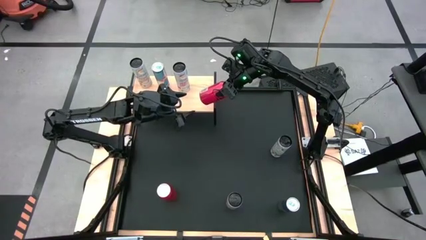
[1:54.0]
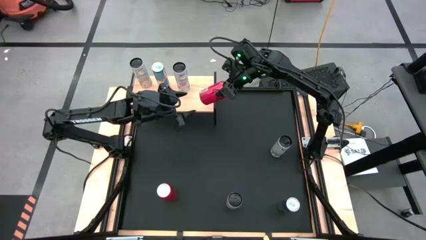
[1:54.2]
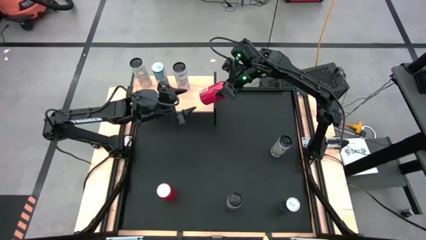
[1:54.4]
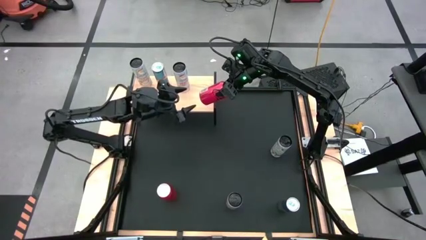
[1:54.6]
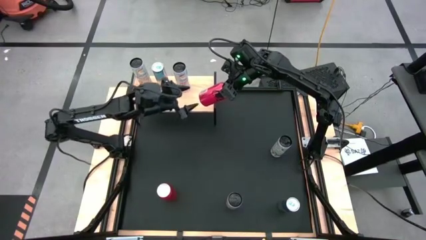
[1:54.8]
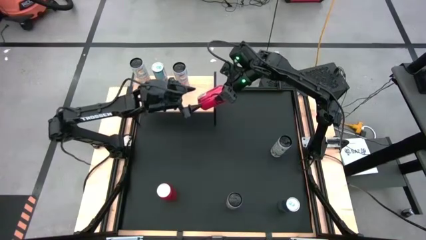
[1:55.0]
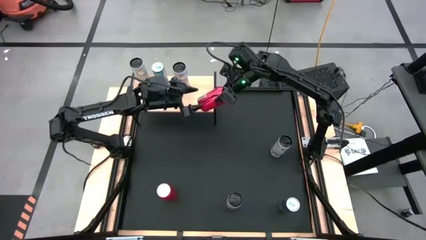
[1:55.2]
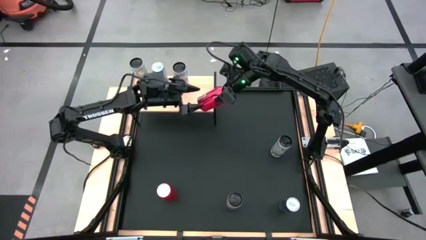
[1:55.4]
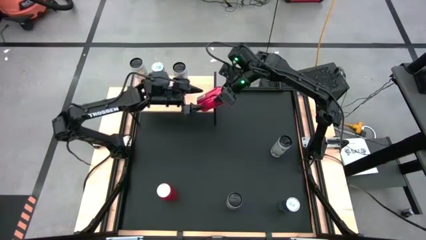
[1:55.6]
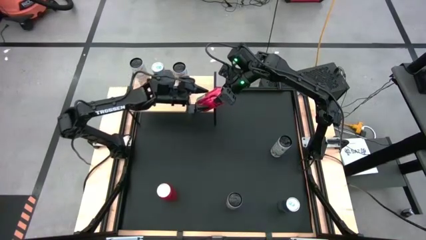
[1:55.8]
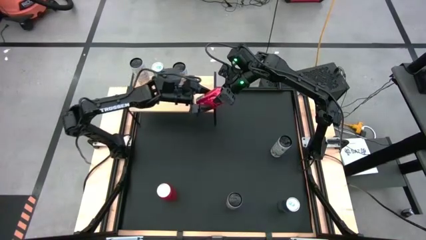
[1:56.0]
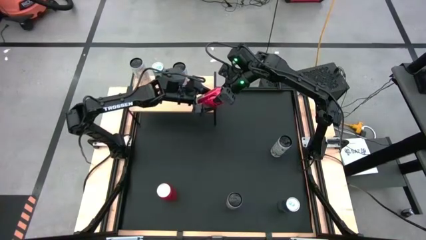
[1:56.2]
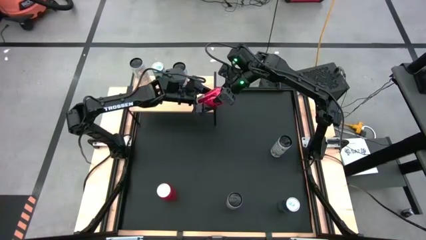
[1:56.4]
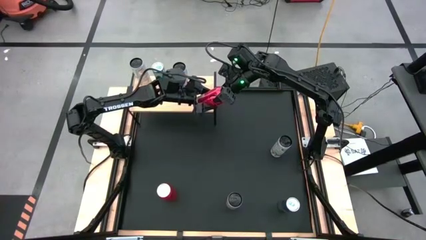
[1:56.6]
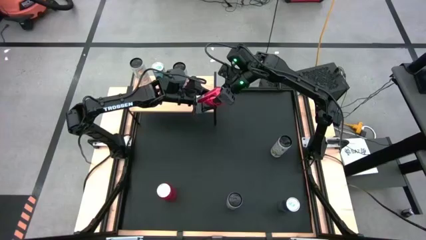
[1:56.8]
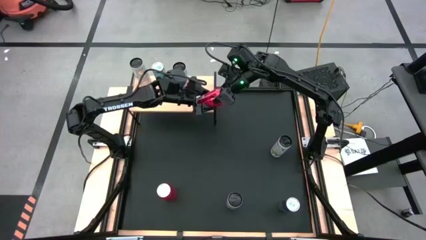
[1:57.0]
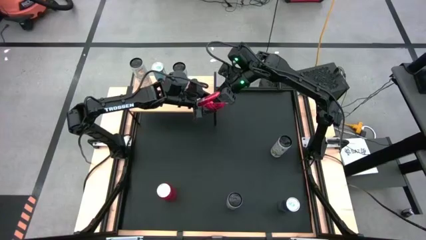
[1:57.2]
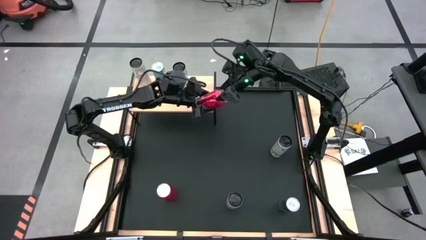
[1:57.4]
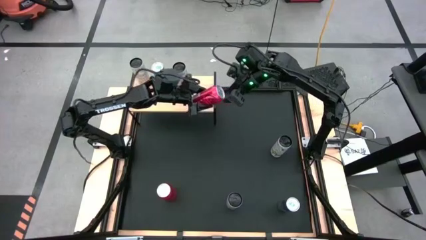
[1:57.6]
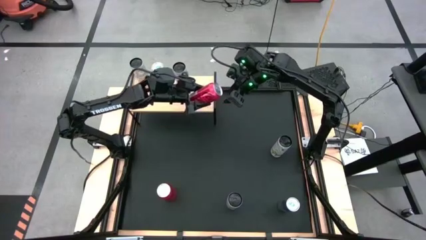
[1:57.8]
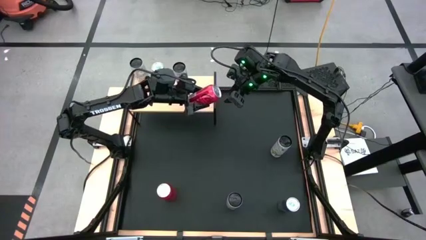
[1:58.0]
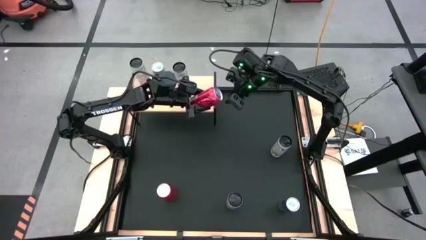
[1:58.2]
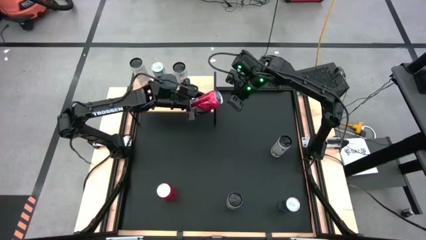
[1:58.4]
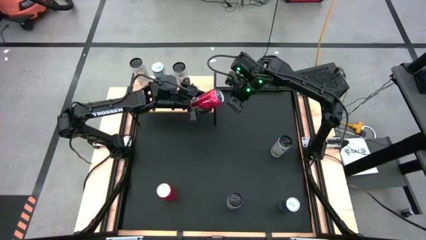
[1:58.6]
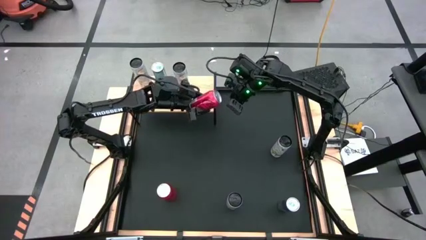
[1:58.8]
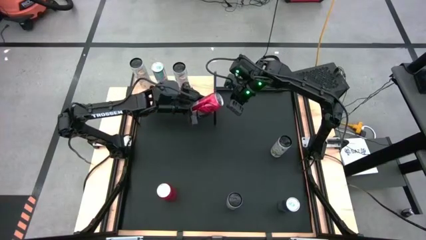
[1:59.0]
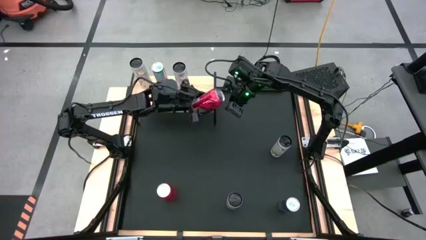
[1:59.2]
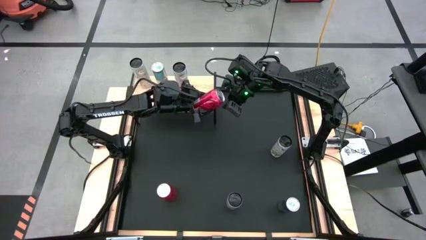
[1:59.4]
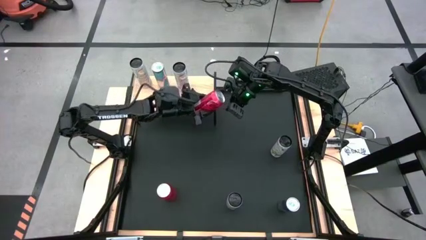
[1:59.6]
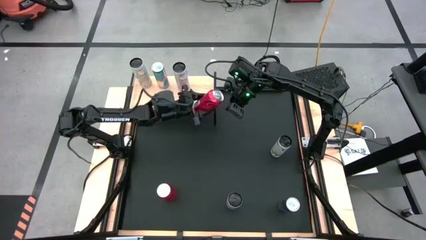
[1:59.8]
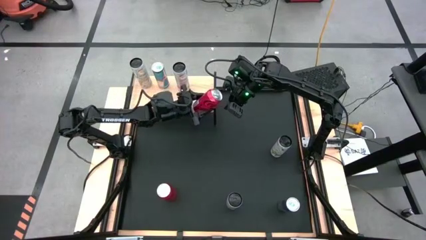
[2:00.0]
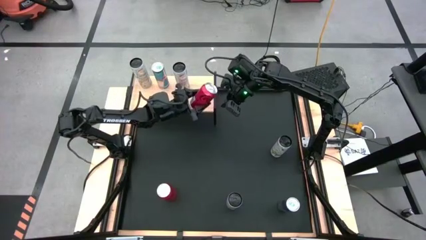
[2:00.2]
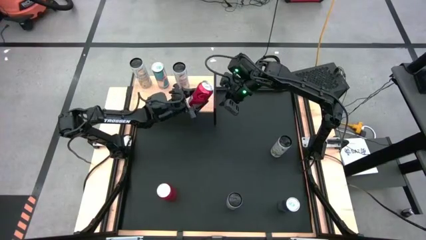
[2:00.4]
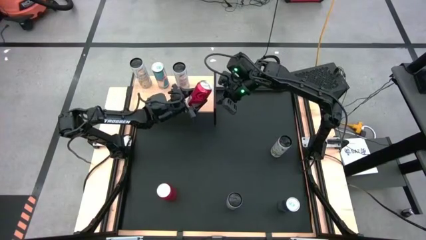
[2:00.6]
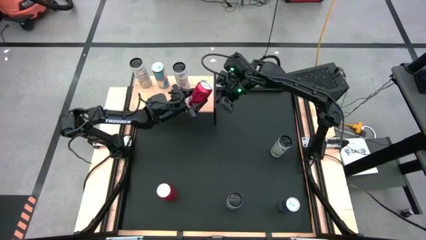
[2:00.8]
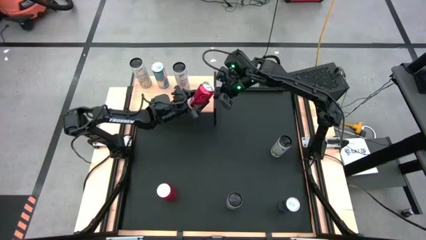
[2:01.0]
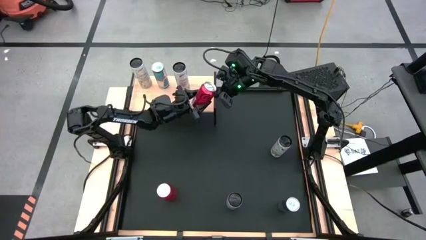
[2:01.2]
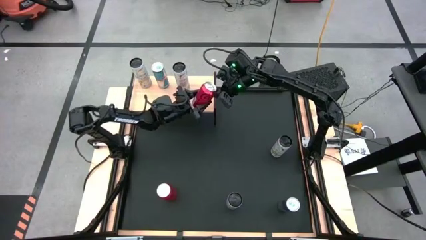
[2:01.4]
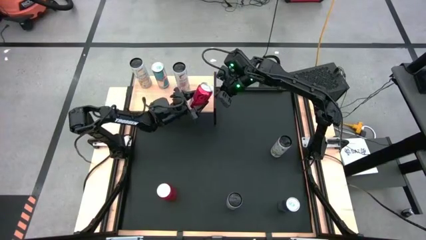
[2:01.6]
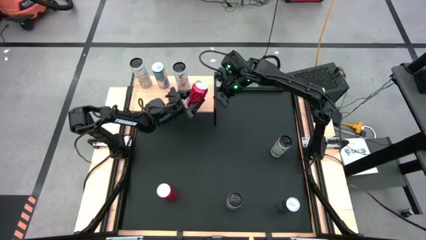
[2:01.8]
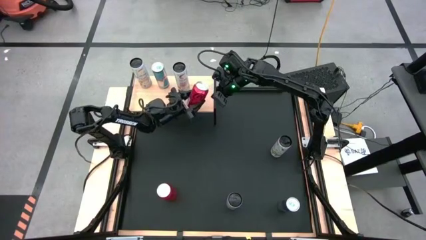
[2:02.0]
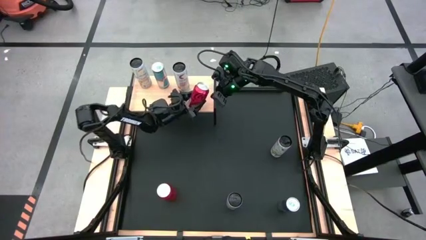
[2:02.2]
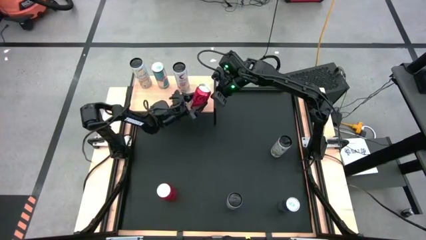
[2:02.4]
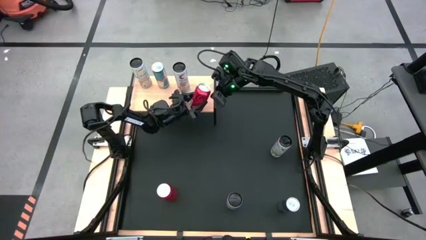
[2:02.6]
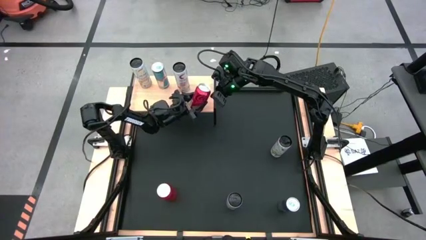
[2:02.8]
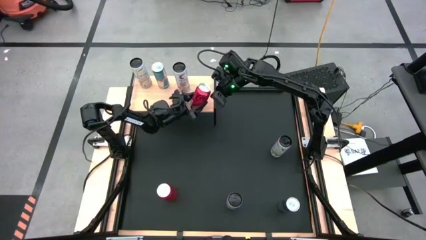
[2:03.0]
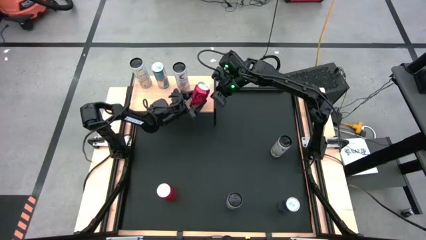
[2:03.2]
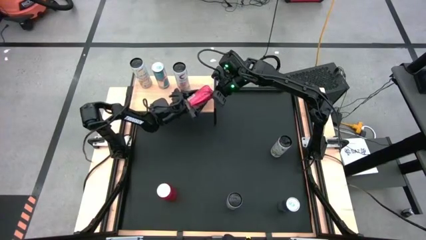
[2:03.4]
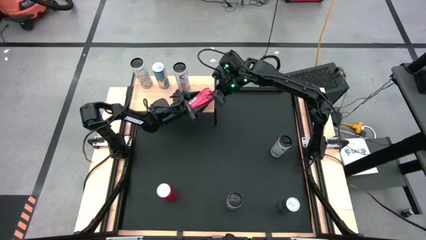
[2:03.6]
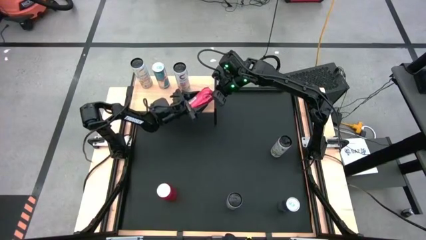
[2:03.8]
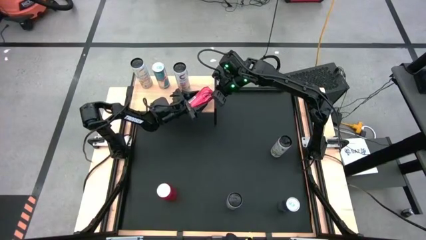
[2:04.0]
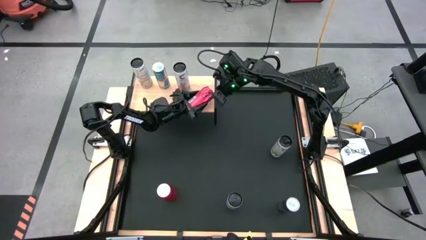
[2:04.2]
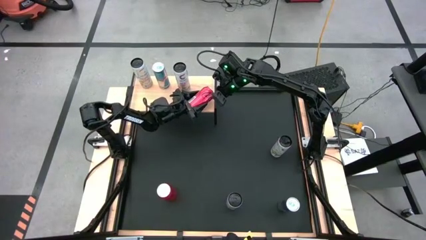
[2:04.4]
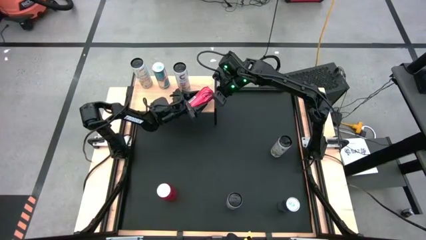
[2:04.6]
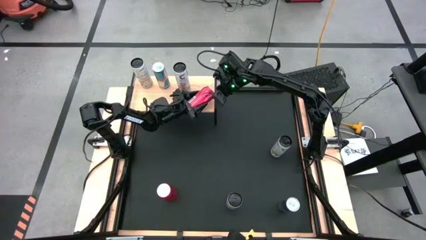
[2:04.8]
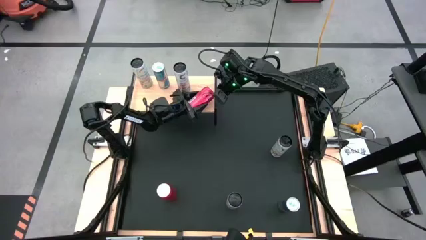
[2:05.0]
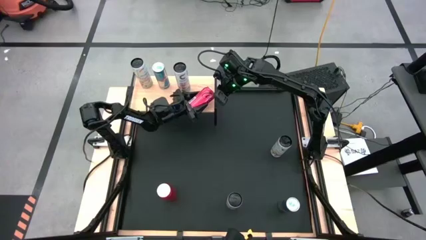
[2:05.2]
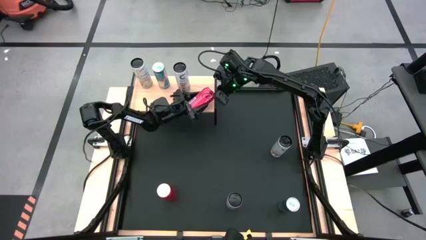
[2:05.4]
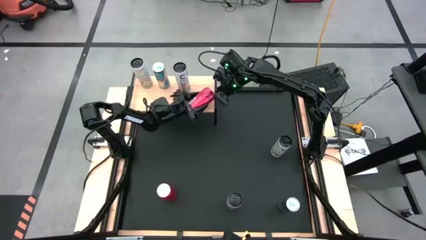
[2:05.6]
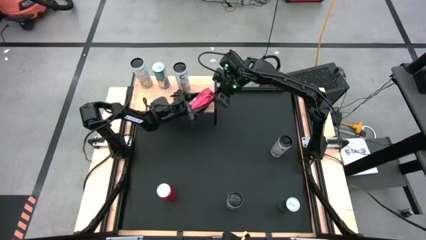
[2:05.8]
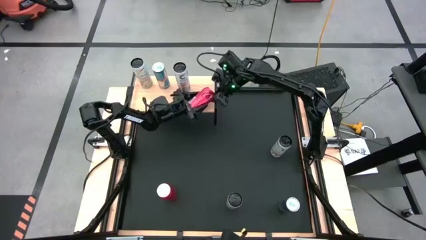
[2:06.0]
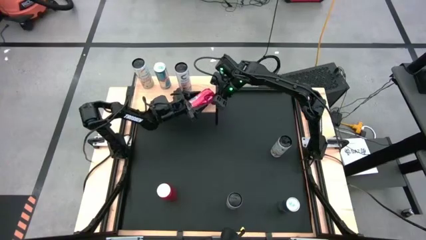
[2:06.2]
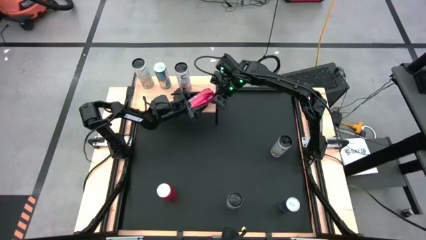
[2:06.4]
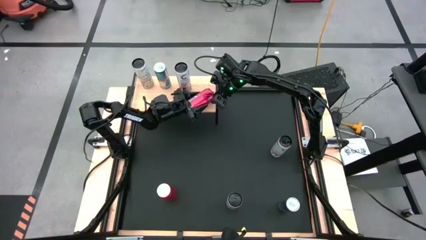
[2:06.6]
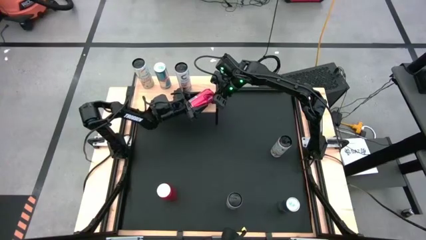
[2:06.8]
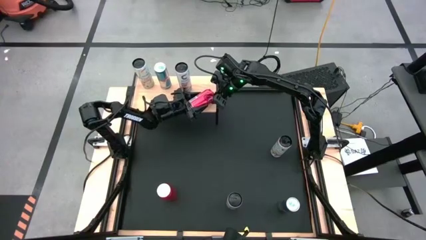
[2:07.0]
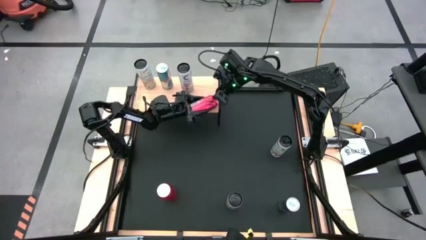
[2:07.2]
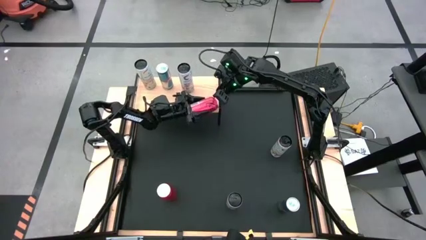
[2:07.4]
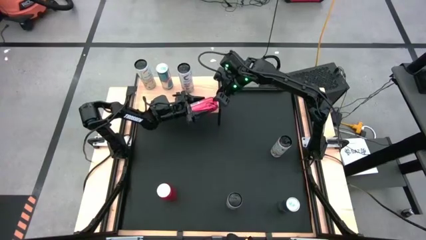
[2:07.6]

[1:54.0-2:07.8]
Task: Place canned beverage on shelf
Put the top red black soda can on the shelf

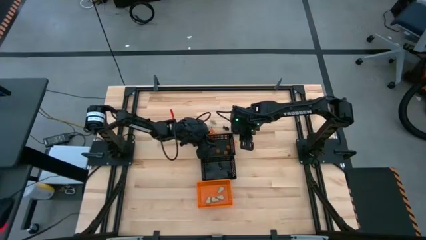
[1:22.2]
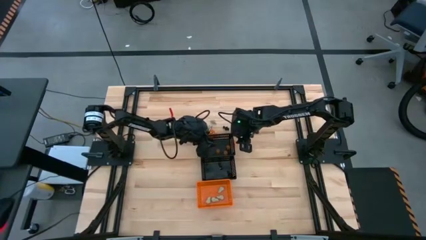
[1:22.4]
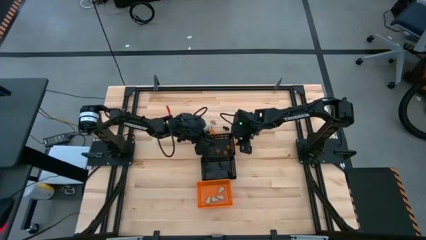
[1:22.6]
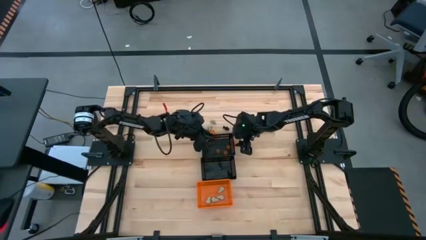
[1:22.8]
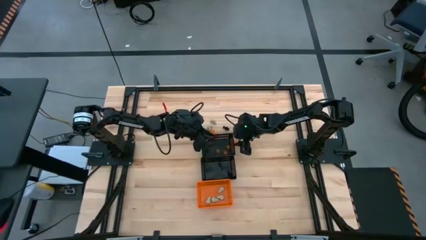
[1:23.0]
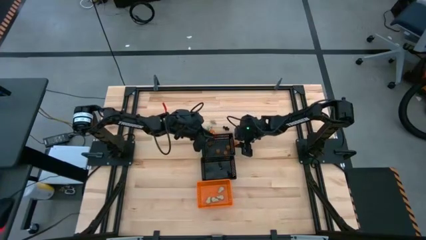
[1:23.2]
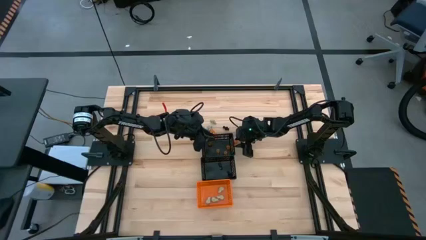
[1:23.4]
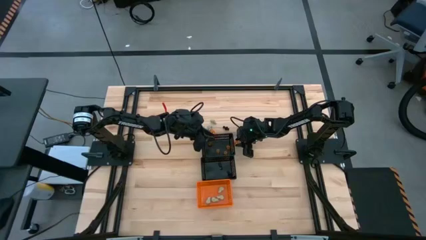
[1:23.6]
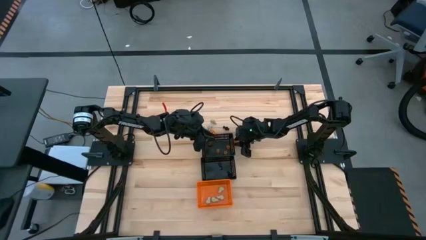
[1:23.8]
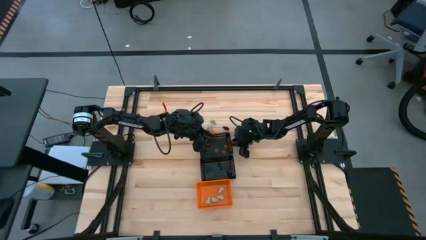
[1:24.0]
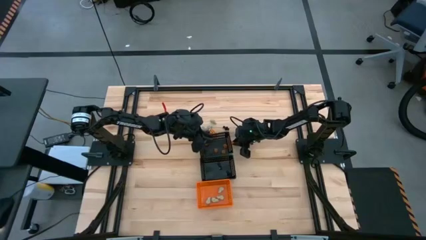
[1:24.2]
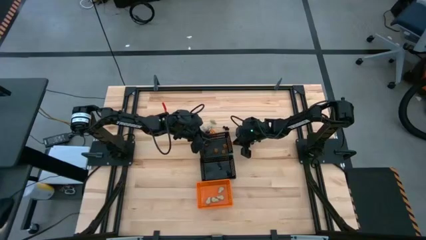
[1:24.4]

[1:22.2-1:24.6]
Task: Sort Halloween decoration
Put the orange pumpkin toy into the top black bin
